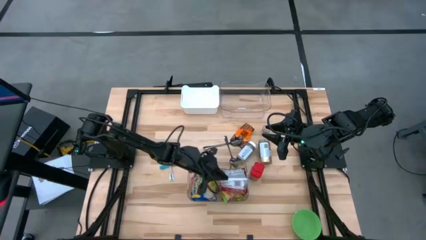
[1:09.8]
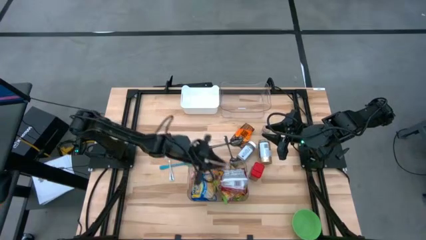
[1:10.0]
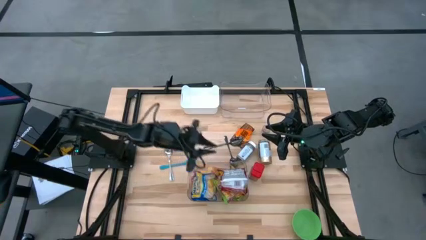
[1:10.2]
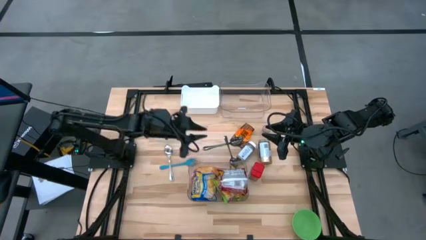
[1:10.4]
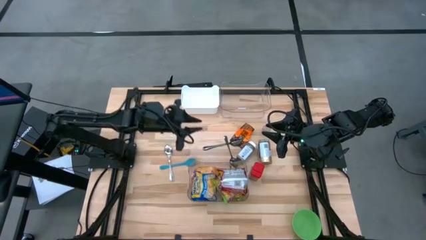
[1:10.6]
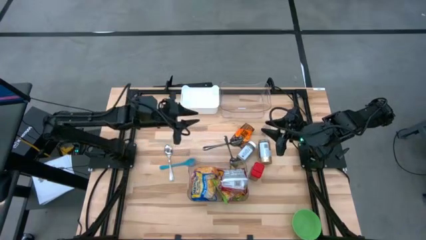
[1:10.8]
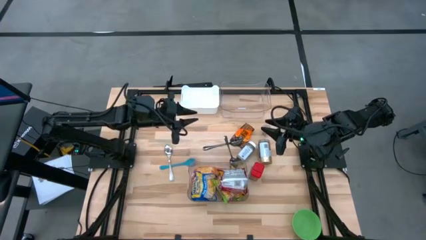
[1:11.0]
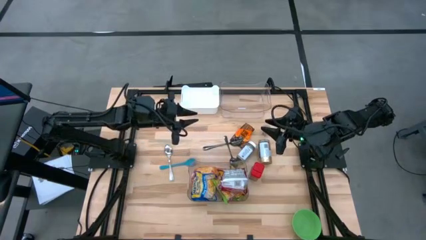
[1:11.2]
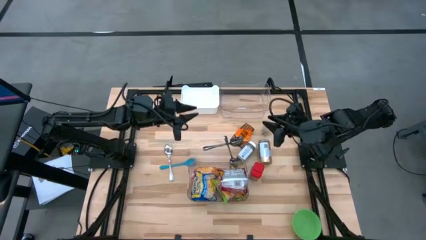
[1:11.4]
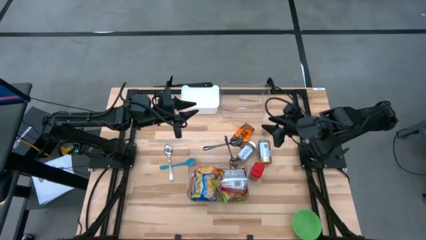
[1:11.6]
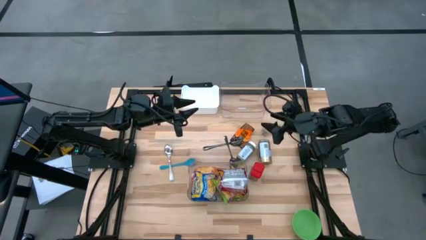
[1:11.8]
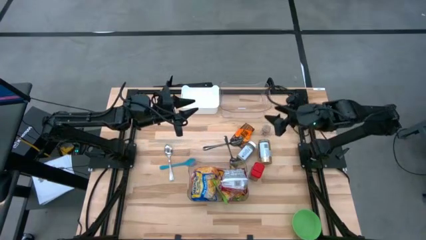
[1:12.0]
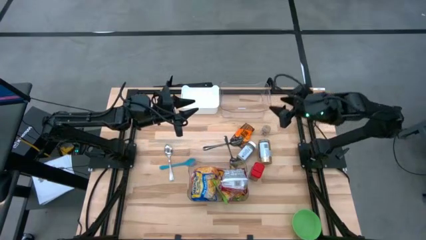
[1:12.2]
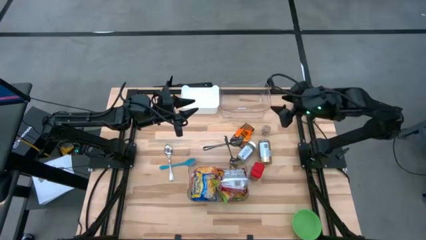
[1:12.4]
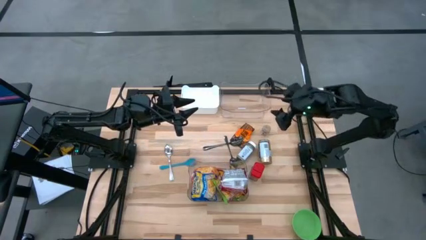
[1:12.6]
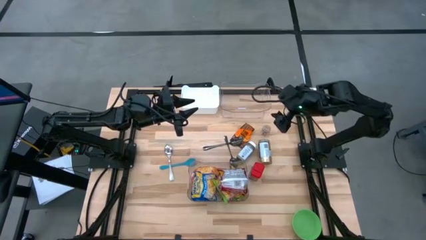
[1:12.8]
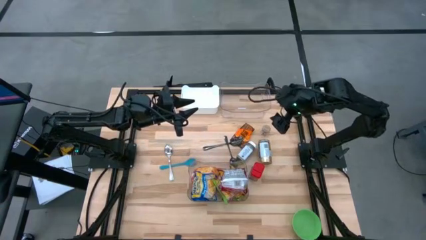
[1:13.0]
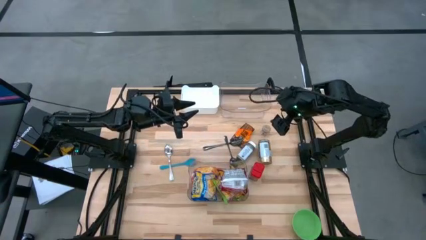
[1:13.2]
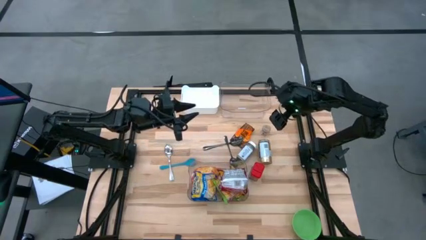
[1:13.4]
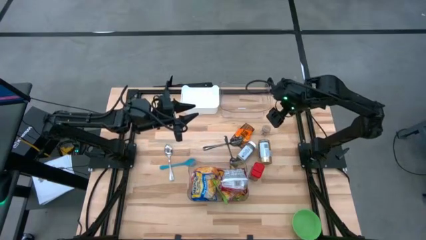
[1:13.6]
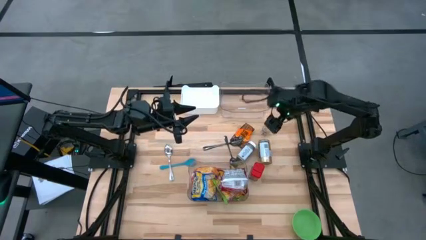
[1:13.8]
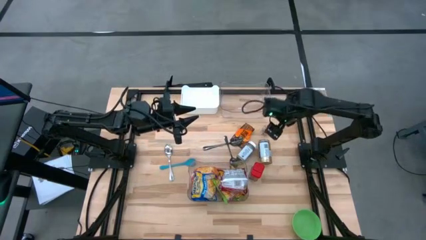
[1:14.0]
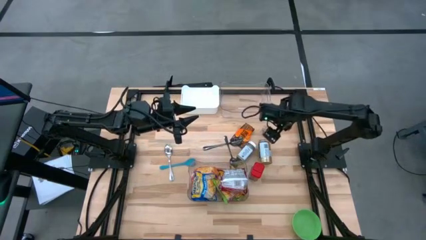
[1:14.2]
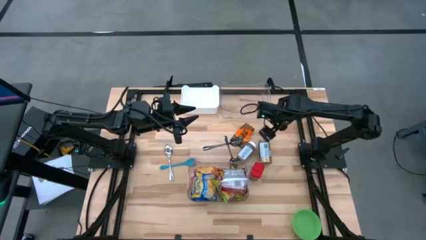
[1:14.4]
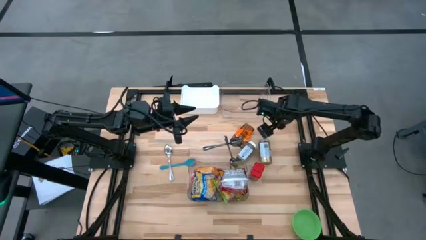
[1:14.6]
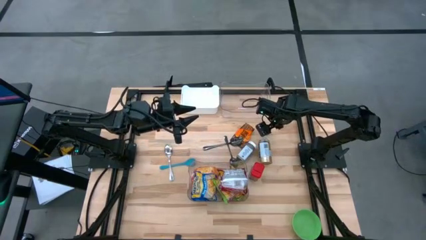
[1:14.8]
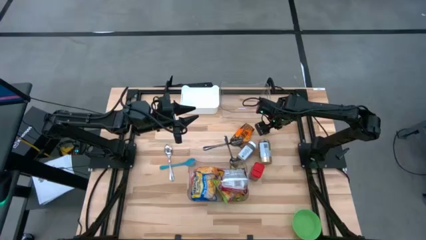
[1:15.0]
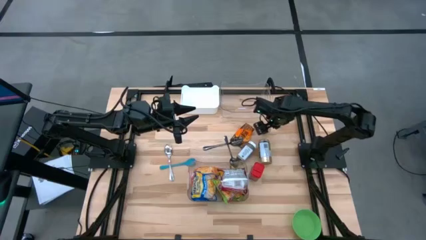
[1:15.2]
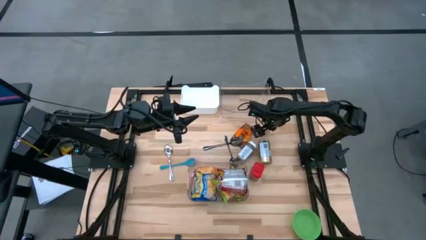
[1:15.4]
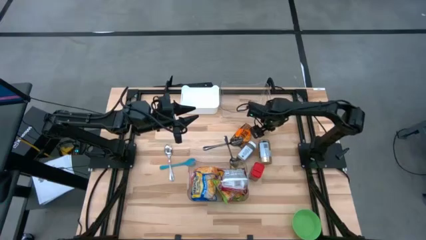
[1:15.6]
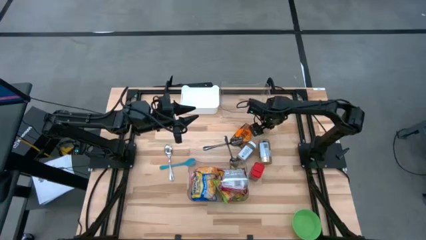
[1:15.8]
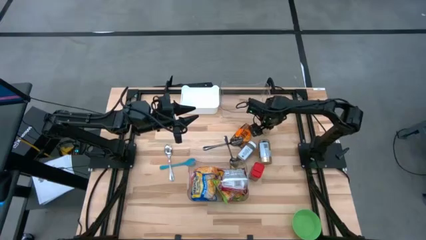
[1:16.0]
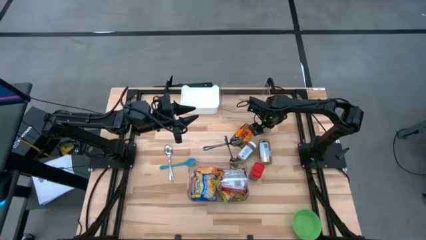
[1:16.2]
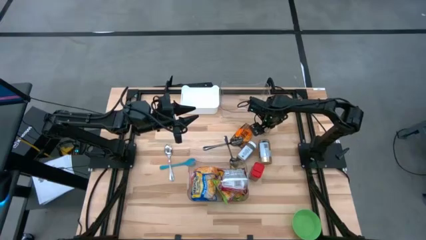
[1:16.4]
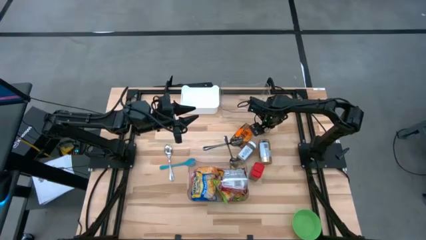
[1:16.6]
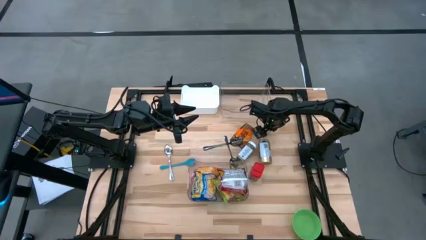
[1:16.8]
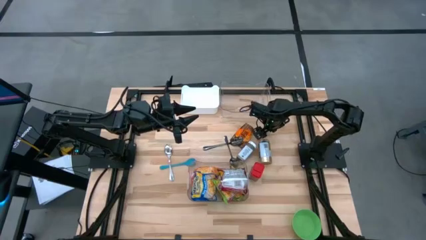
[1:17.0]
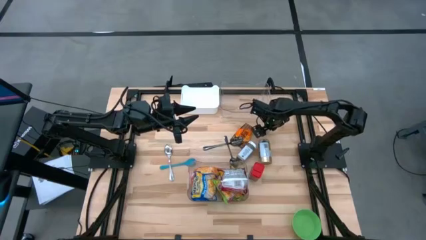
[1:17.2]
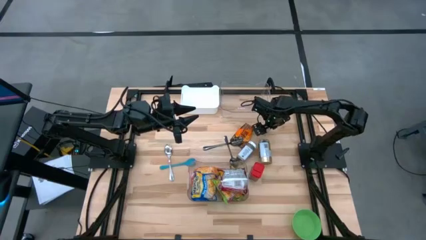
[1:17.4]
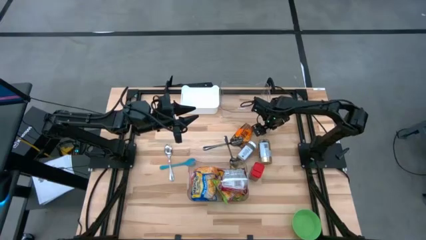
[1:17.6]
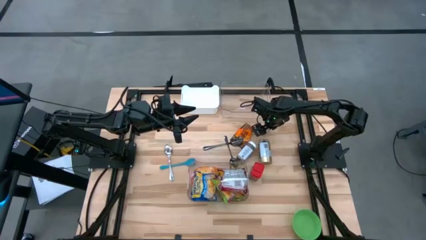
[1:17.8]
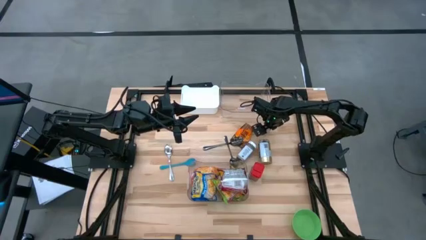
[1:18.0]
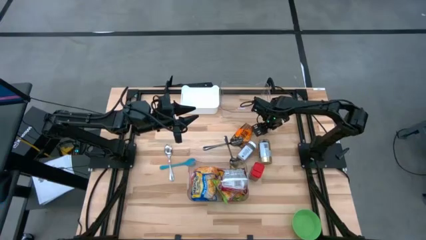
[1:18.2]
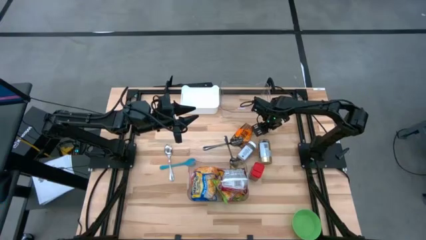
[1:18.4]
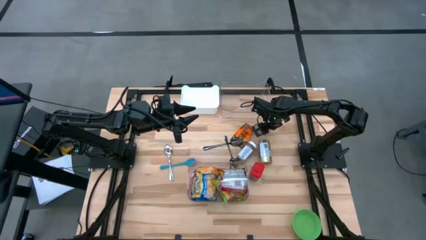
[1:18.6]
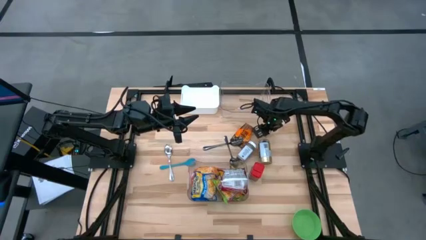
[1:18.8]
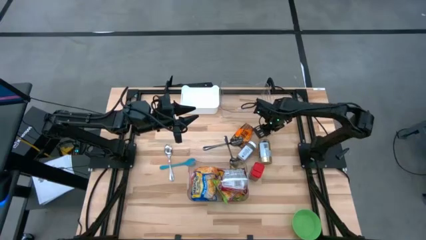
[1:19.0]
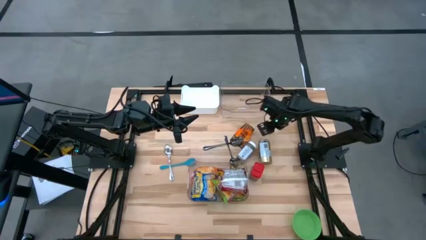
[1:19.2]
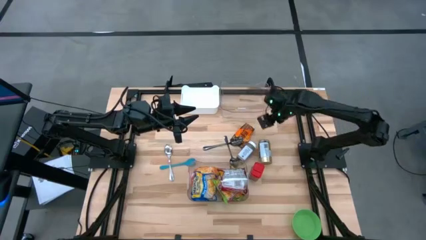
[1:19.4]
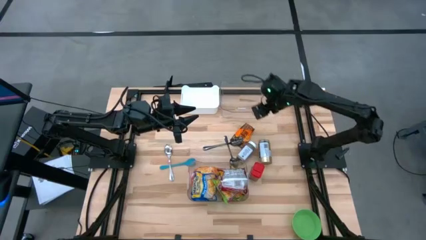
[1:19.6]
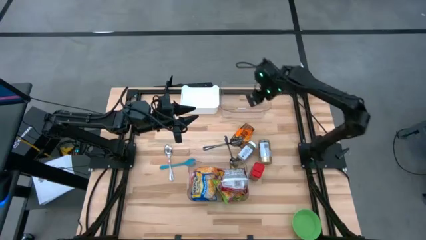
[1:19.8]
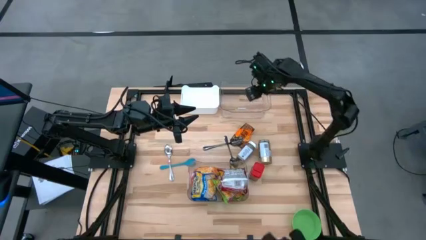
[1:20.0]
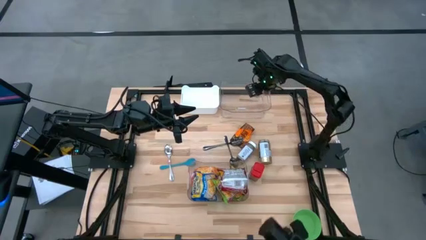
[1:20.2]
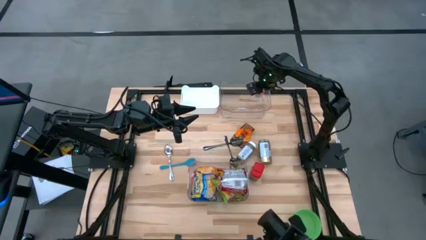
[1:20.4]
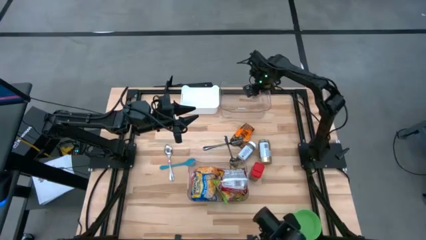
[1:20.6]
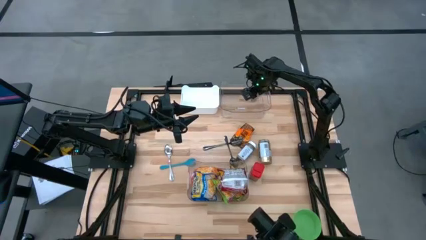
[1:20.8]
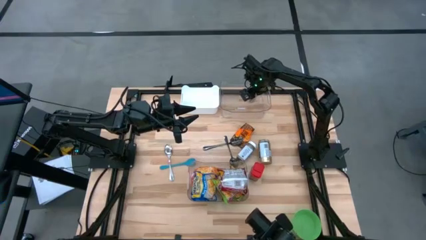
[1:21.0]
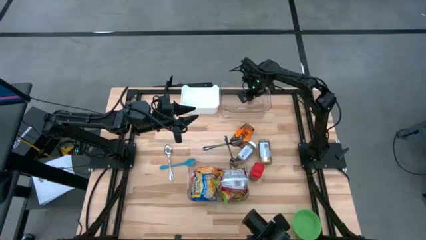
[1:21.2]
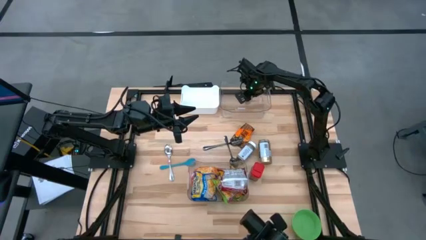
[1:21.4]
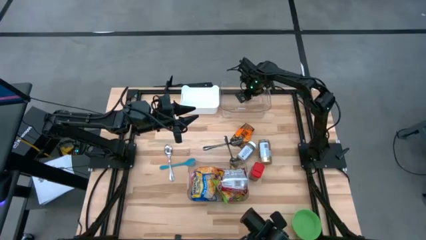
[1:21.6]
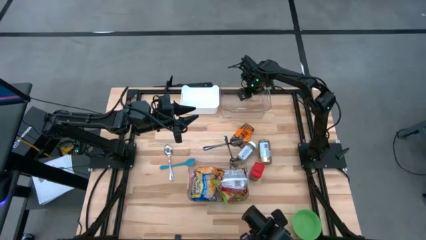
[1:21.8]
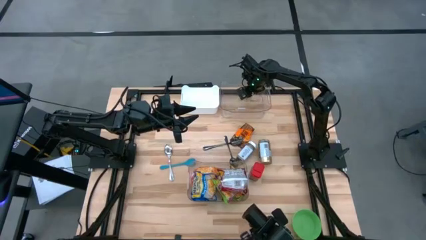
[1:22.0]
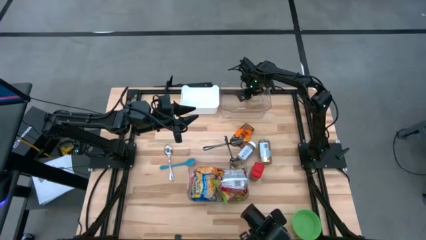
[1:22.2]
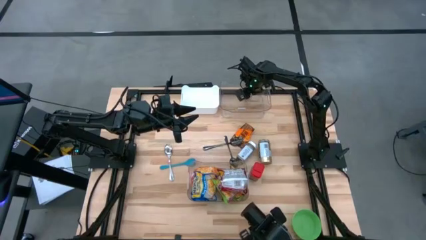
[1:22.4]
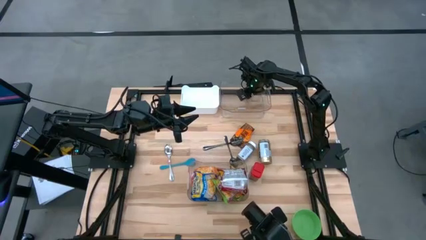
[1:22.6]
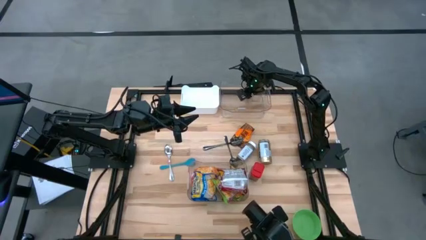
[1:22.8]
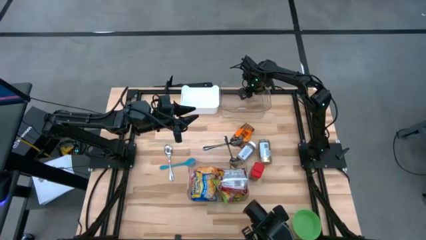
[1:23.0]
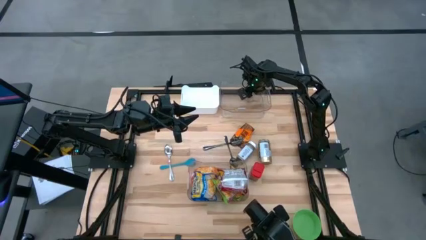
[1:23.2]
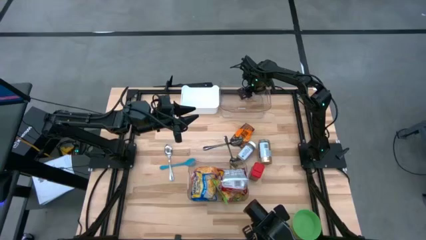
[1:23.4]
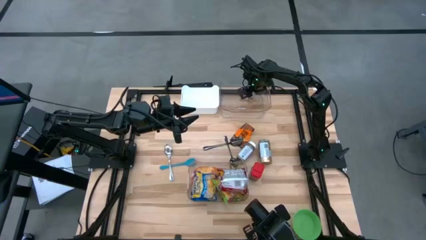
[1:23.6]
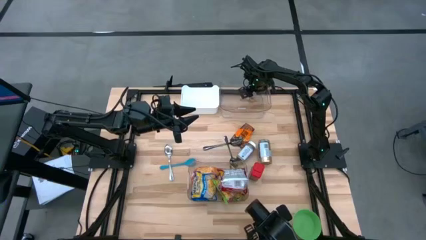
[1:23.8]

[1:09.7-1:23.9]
Task: Pick & Place Food Item
Put the brown seasoning into the top transparent bin
